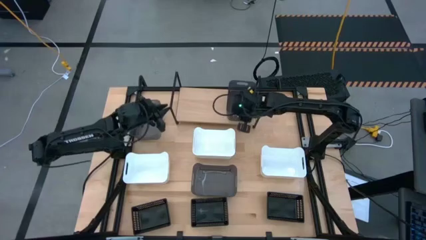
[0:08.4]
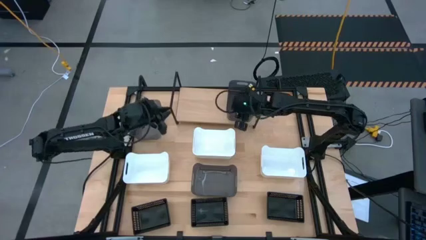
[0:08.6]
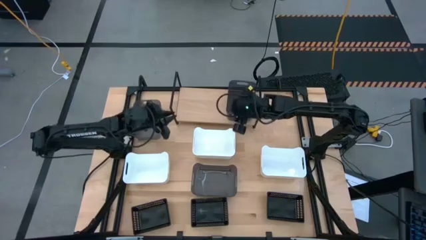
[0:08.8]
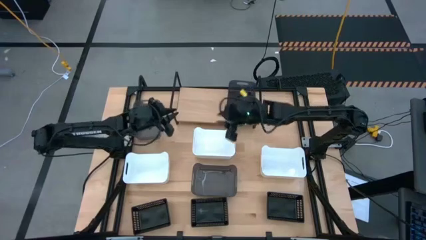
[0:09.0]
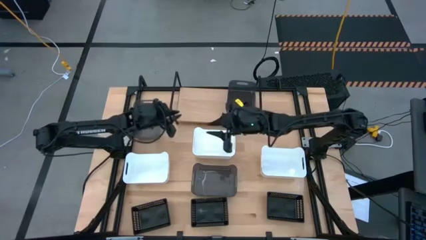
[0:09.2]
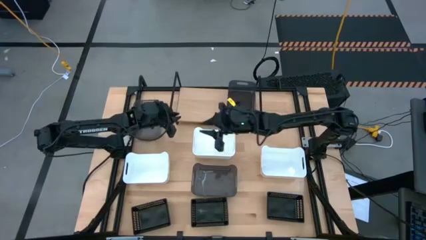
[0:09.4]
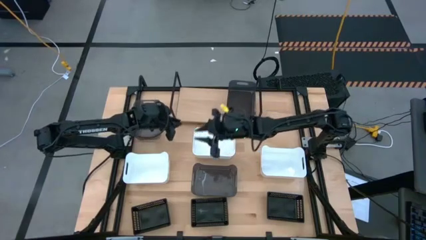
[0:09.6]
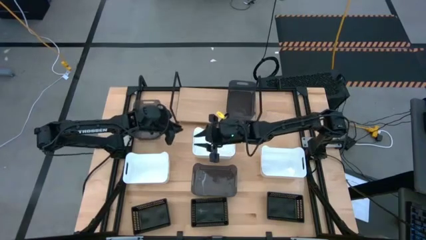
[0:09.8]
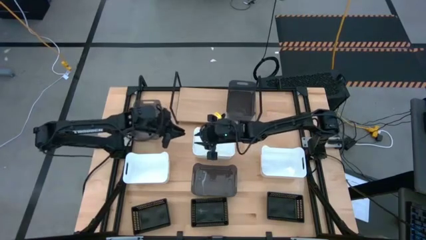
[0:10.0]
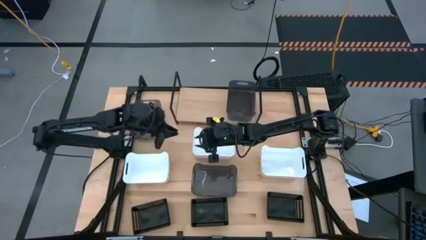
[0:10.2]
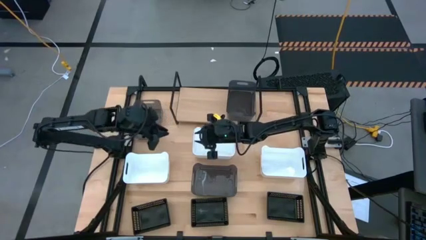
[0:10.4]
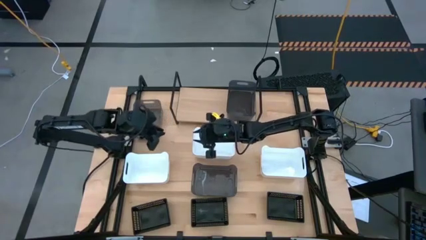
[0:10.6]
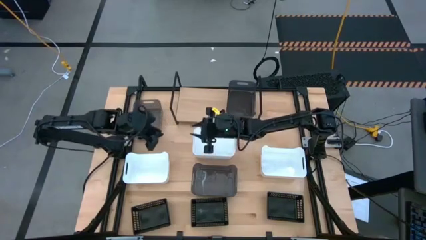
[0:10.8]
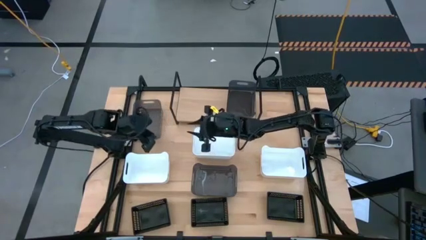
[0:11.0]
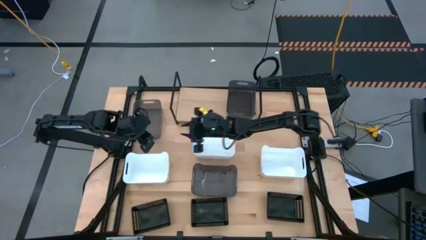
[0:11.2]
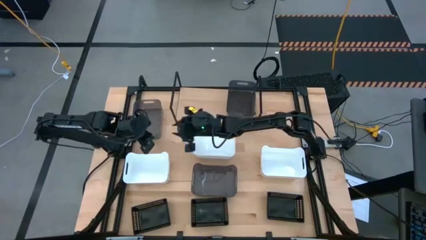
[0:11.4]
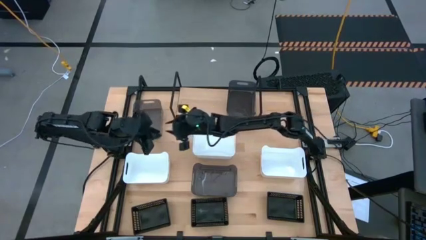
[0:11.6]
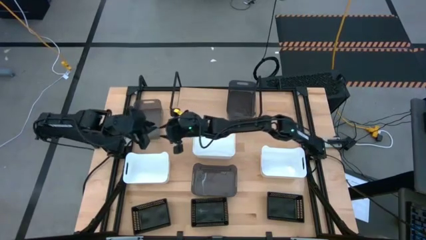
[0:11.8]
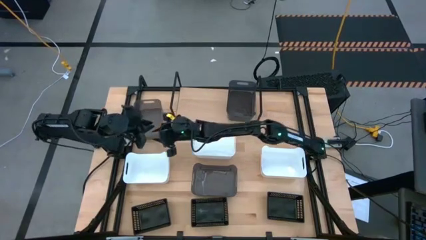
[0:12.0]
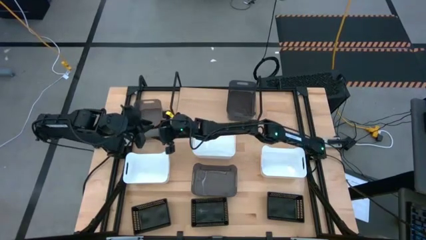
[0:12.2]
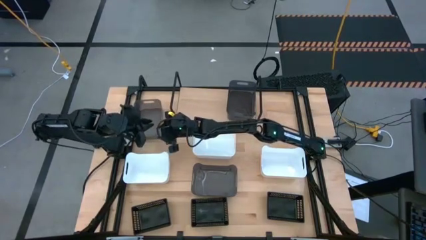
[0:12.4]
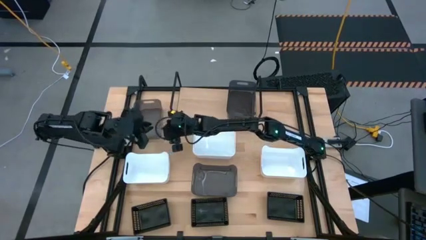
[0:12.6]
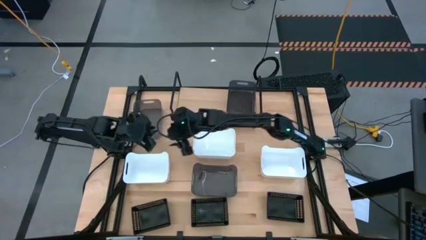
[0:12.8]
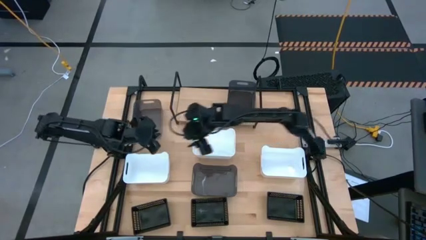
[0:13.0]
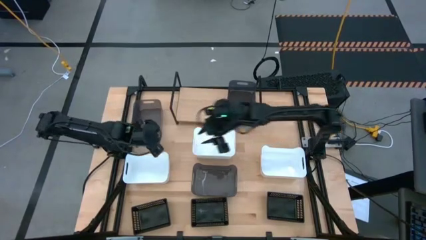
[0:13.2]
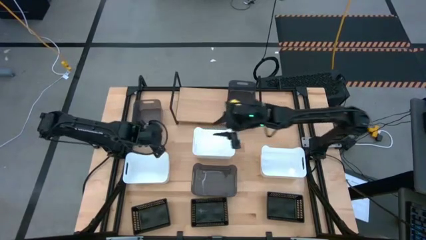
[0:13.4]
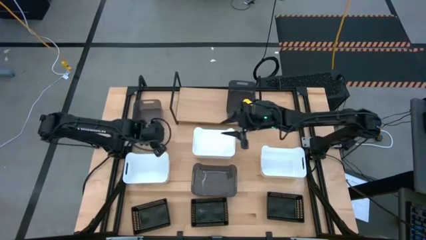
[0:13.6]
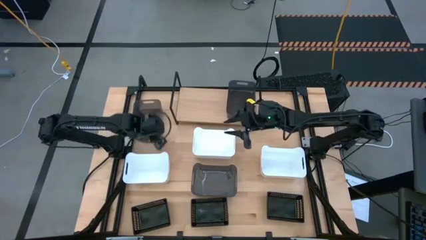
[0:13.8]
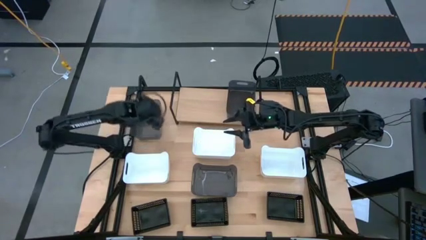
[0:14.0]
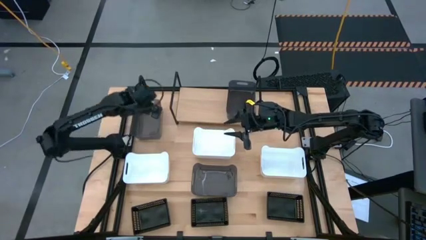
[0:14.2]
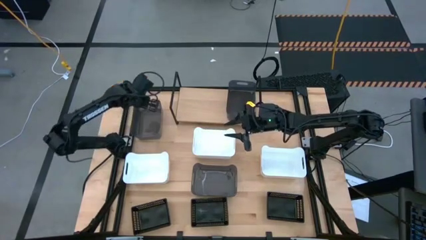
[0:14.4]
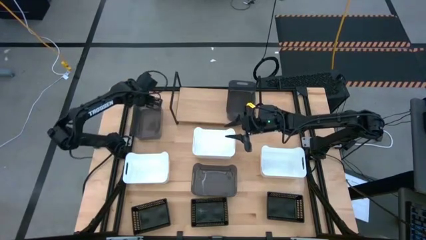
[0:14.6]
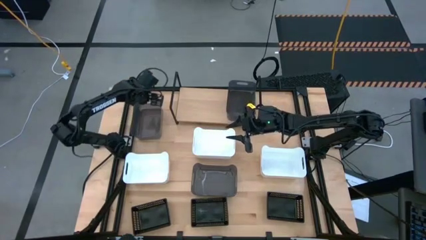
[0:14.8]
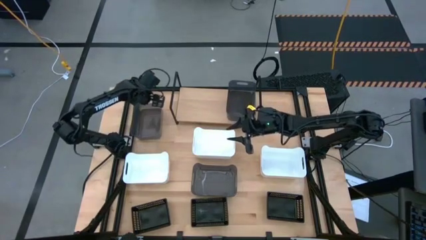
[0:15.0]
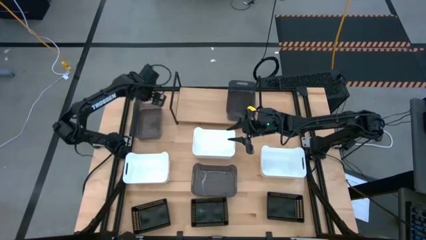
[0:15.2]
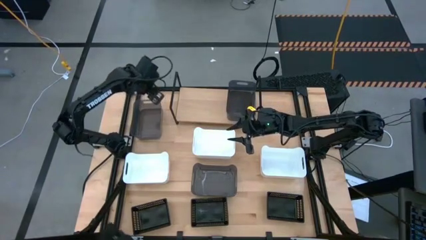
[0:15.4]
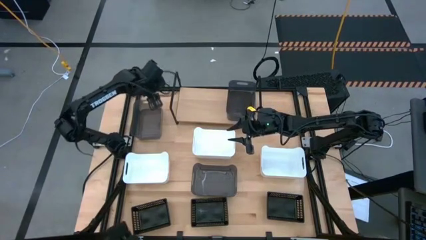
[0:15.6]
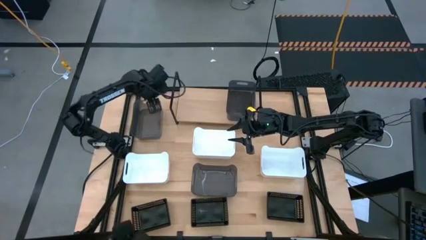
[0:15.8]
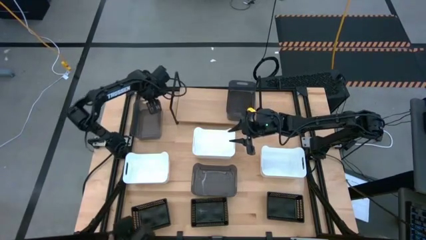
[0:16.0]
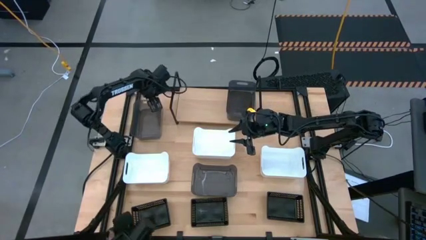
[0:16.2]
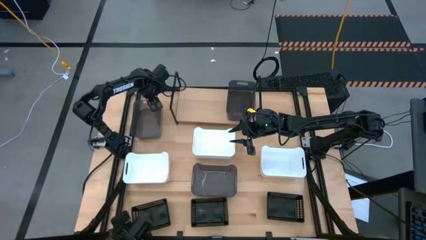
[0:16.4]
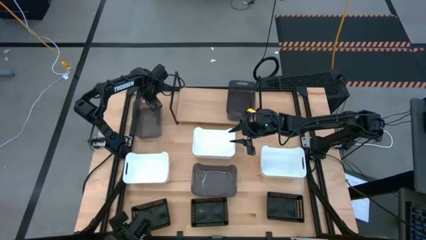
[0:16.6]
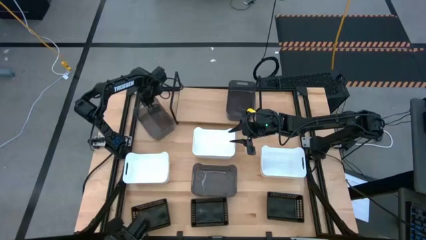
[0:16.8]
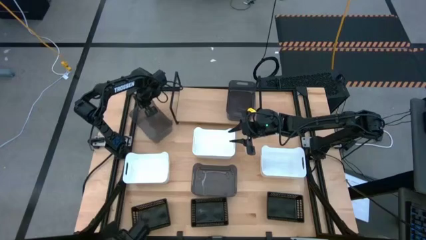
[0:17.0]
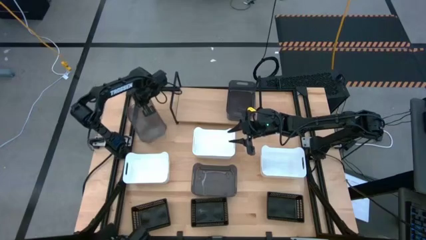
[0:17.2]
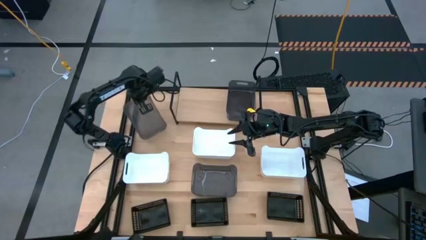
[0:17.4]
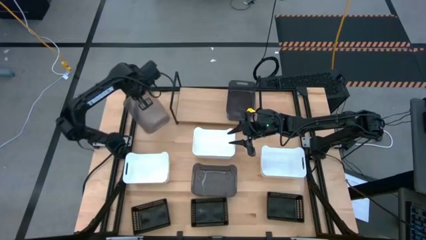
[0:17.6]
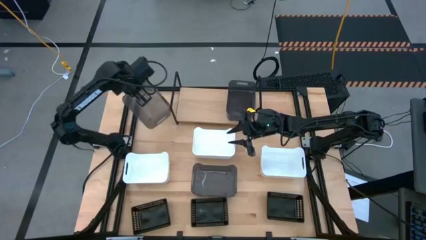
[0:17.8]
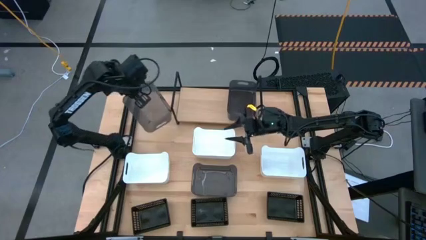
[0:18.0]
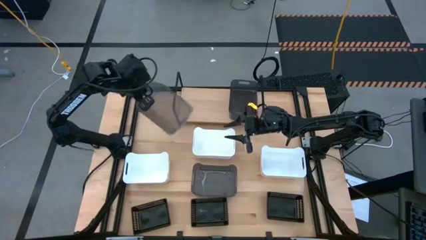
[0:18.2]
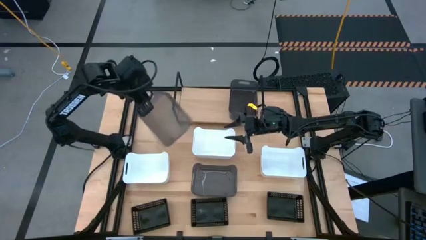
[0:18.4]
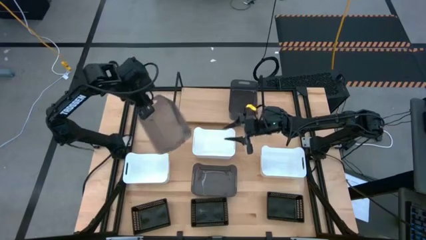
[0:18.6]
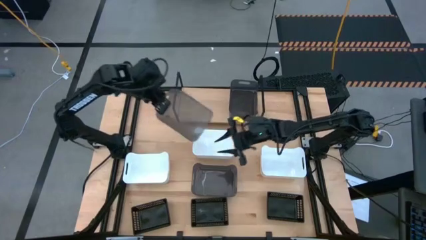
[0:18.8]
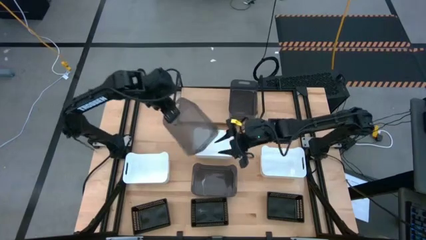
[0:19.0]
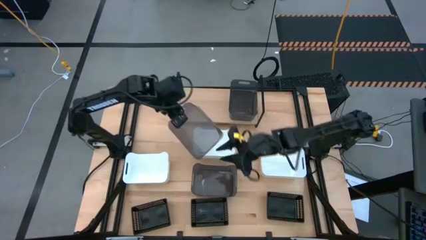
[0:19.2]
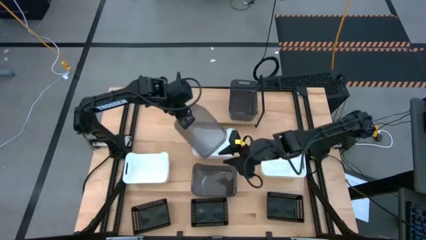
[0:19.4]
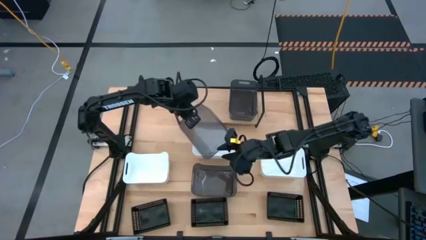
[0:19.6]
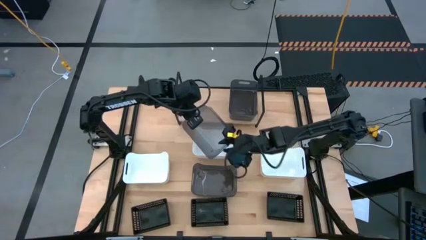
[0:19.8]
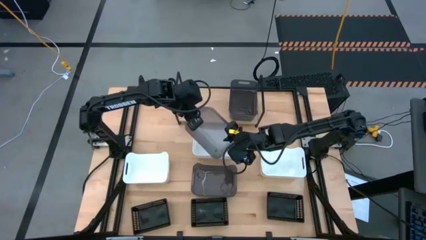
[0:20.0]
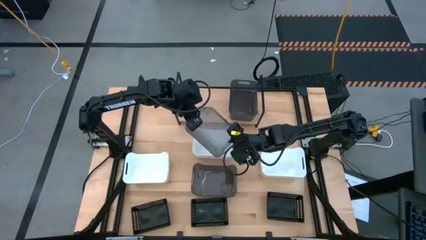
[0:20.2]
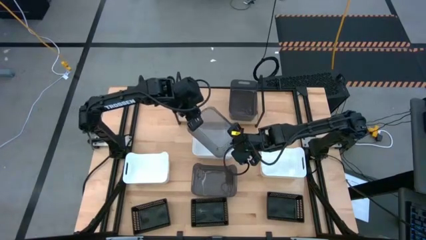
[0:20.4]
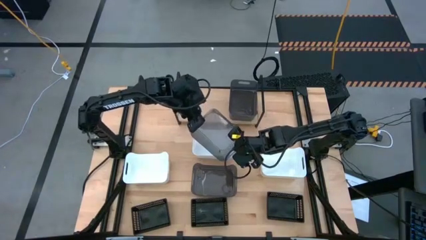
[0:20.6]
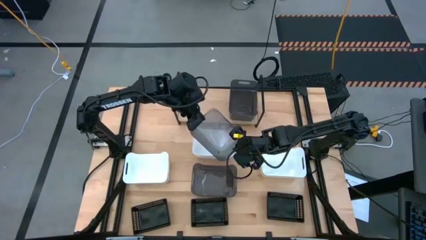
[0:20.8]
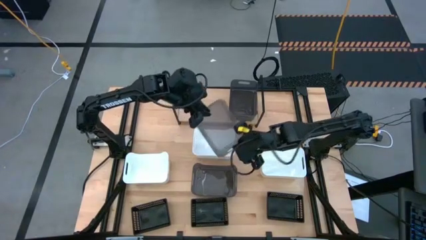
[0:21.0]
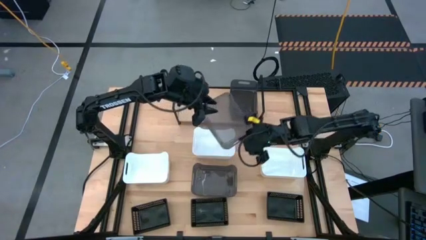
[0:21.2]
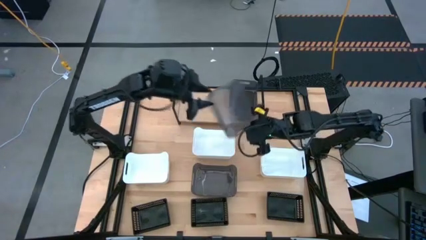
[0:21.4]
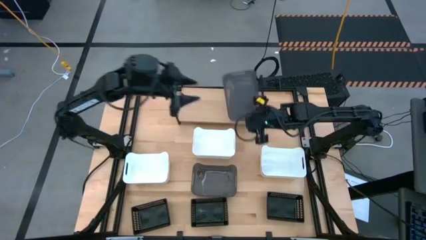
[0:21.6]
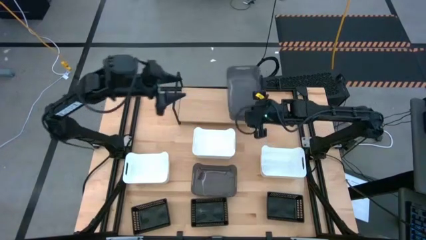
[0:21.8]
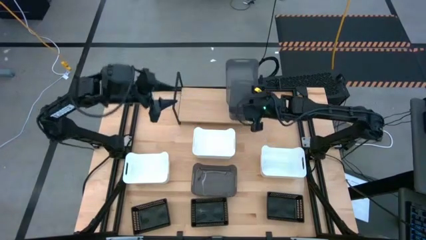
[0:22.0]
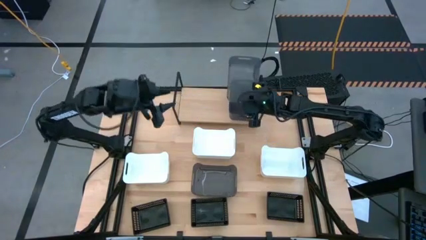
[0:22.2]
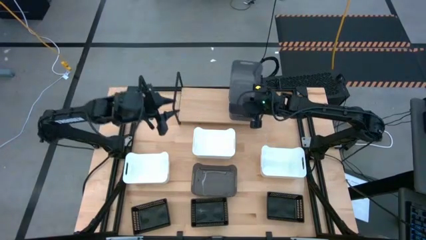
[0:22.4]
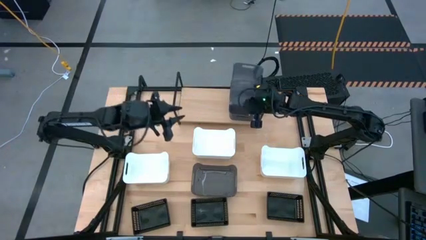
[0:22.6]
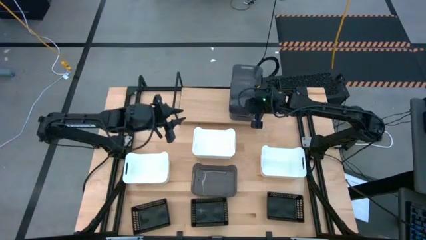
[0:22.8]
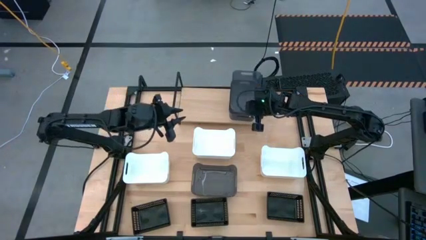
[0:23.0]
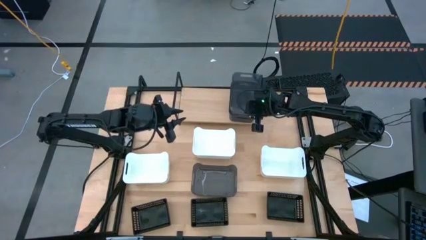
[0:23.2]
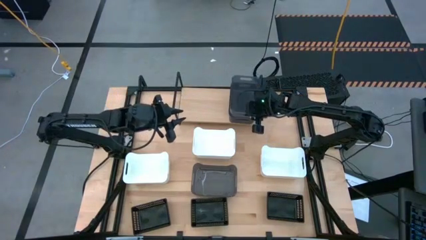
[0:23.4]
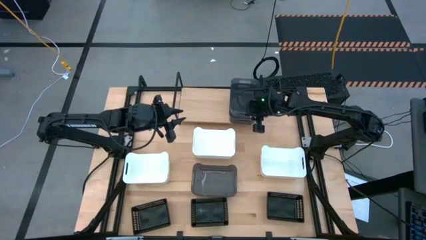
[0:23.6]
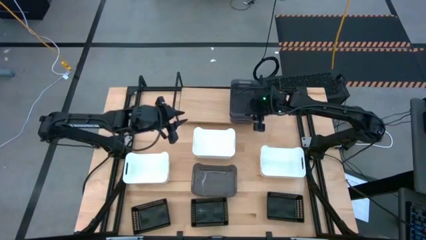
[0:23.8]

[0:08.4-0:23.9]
Task: Stack baskets on shelf by color
Stack the left gray bin into the gray bin on the shelf

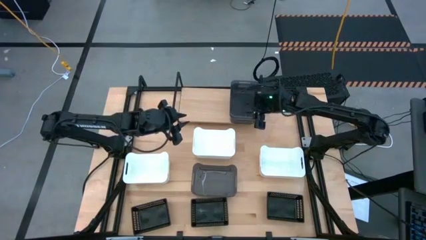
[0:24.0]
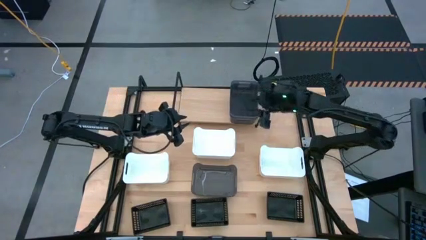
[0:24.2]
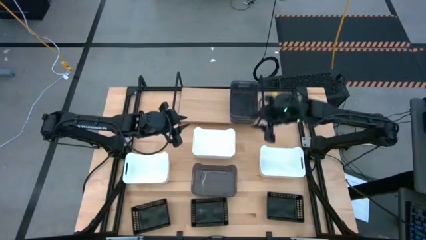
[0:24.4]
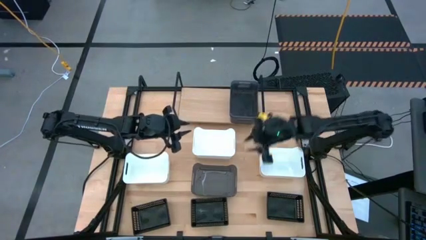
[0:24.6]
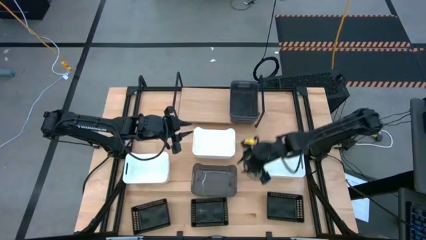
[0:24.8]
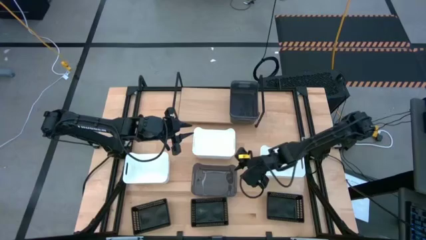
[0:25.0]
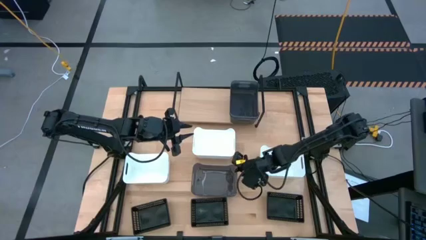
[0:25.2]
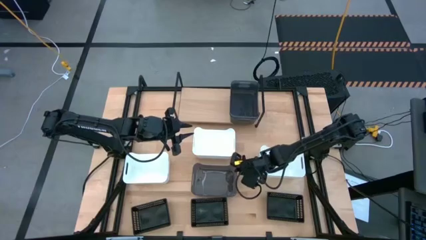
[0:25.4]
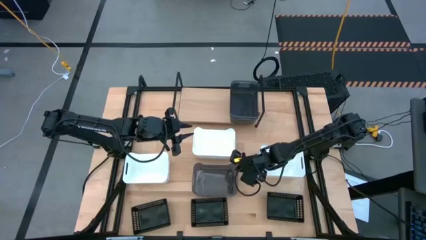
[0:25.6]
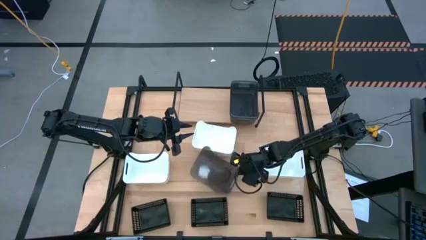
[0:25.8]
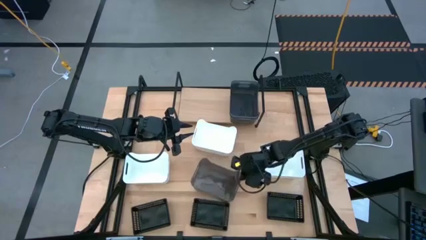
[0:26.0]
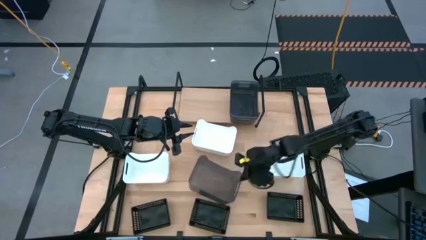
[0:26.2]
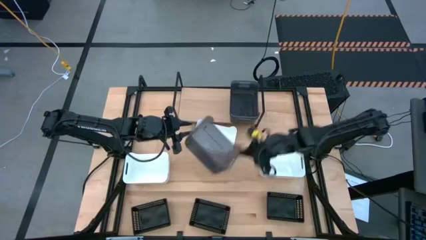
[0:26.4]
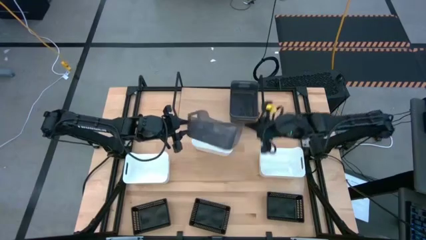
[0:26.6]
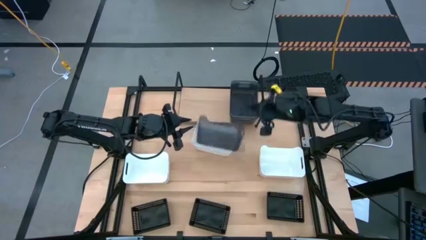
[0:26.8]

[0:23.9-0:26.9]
Stack the gray bin into the gray bin on the shelf
